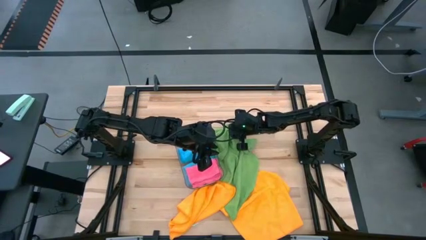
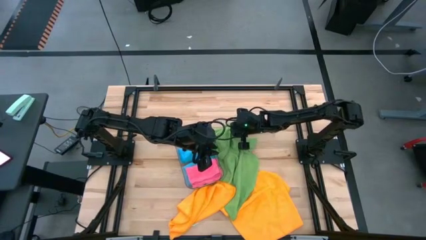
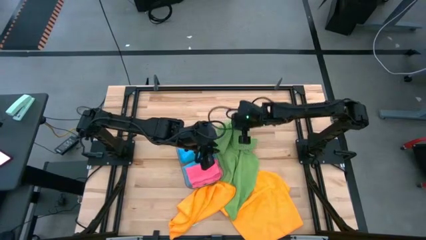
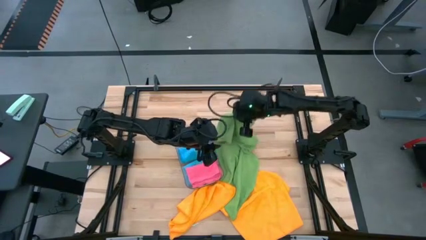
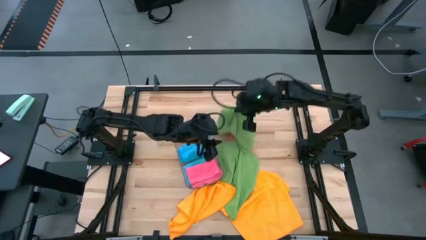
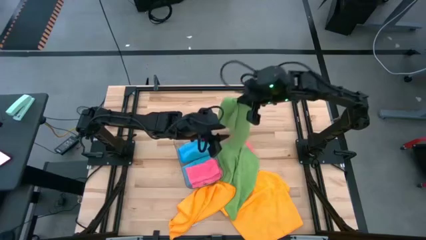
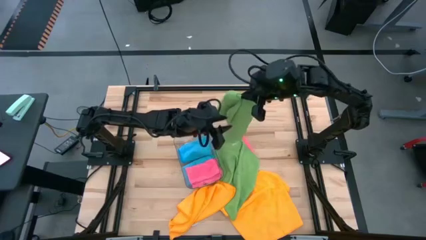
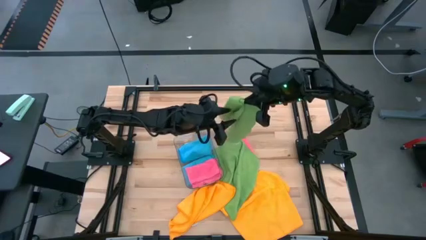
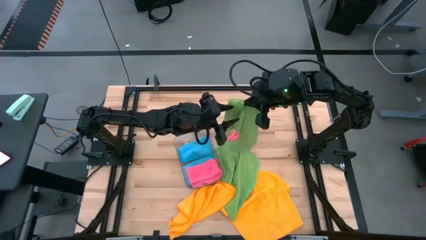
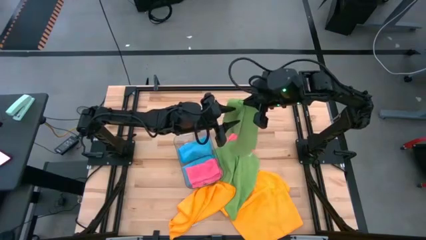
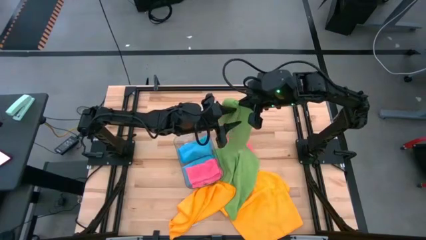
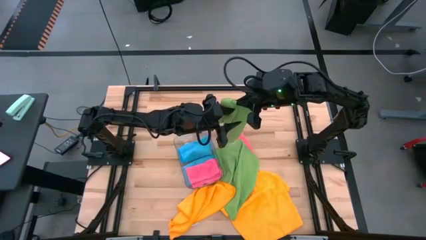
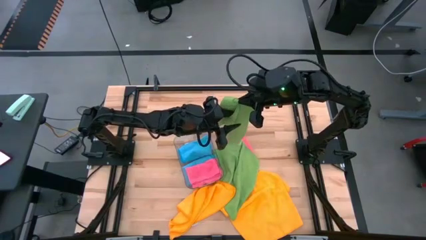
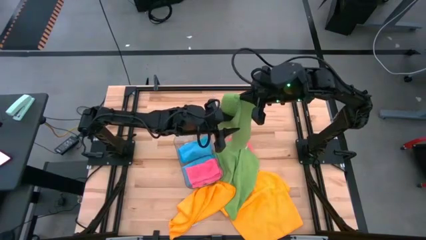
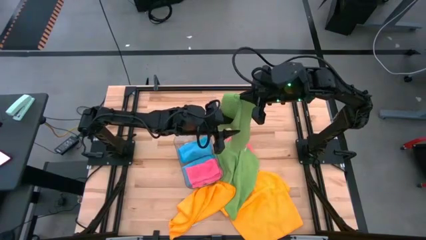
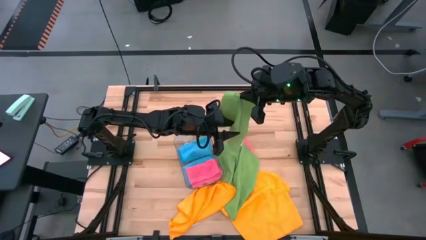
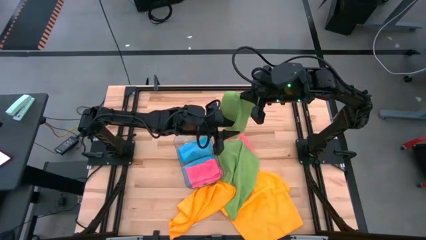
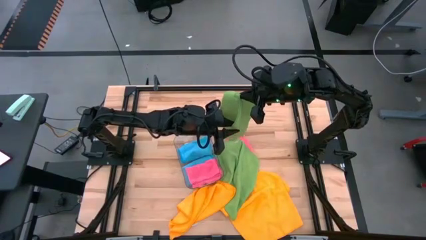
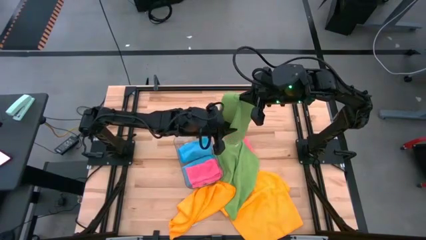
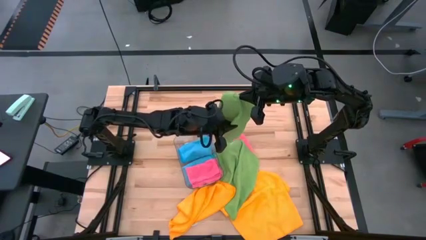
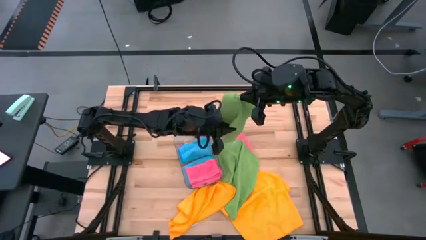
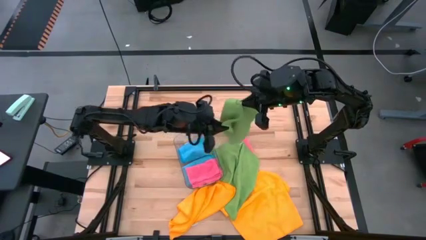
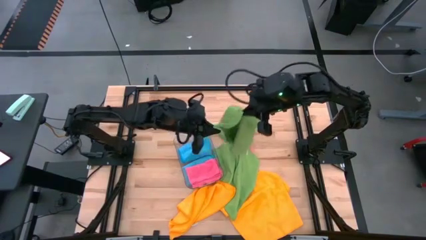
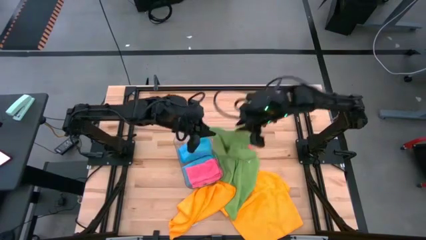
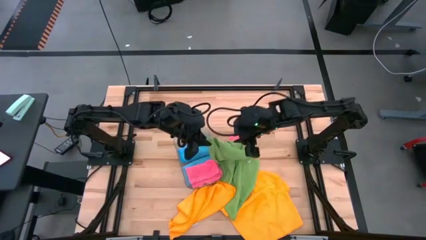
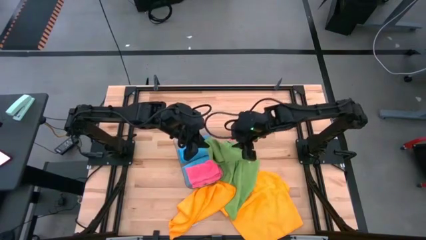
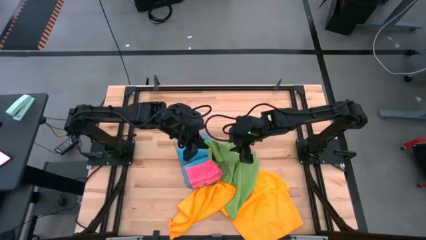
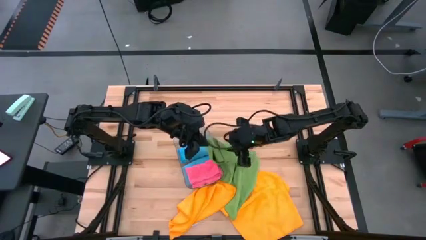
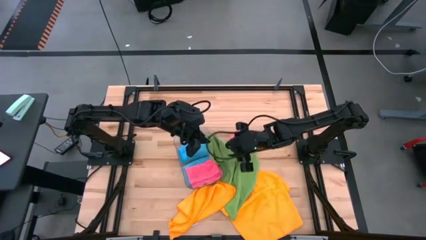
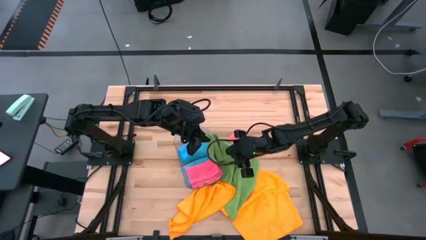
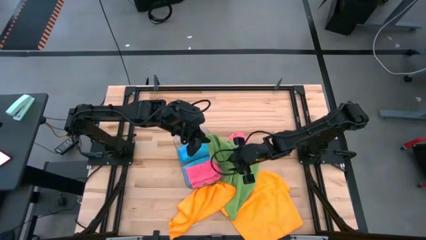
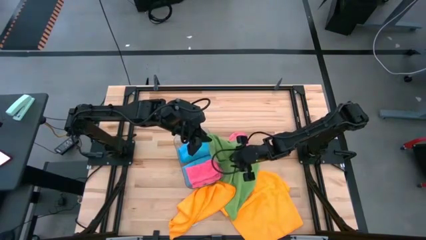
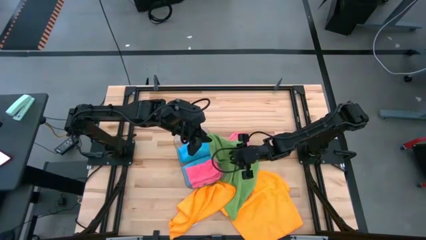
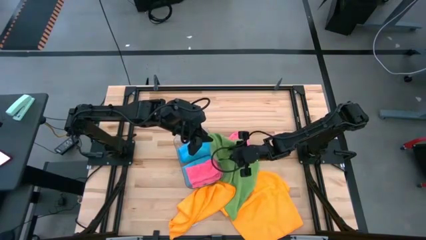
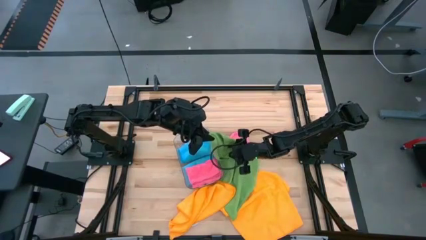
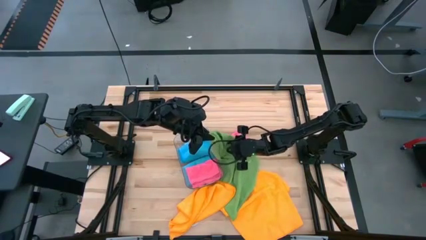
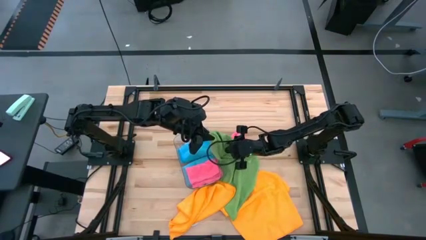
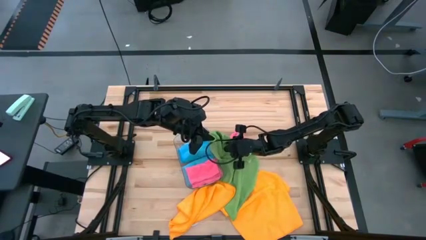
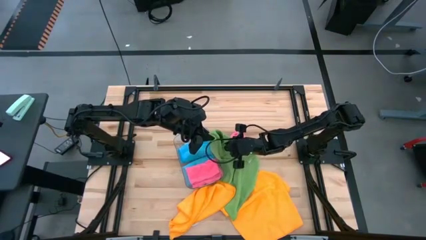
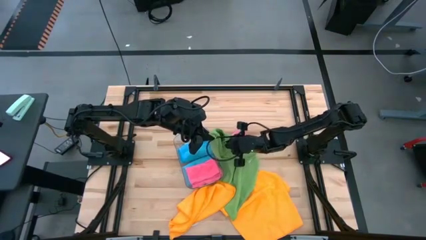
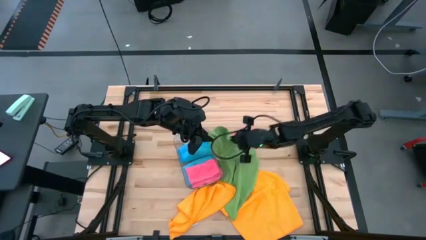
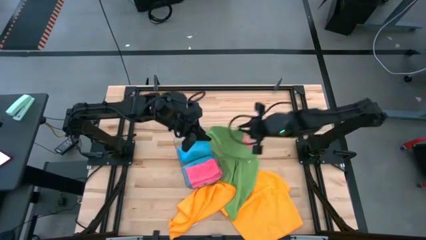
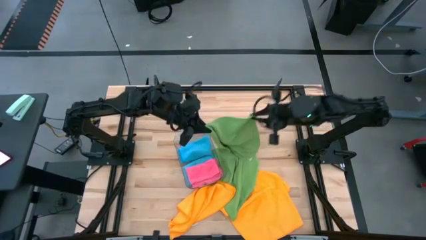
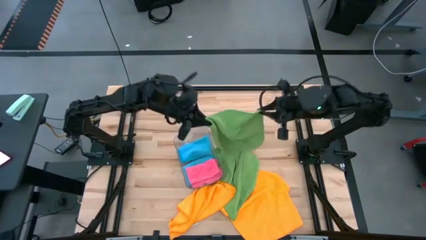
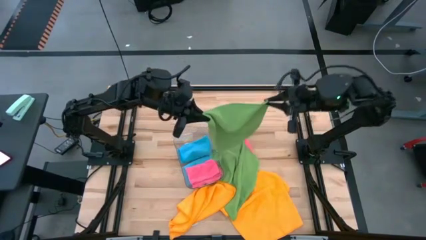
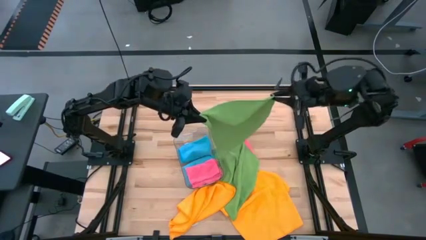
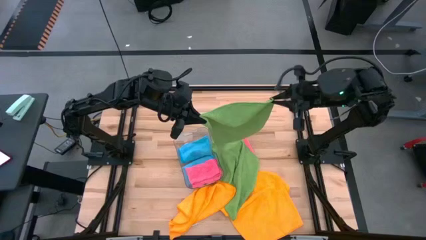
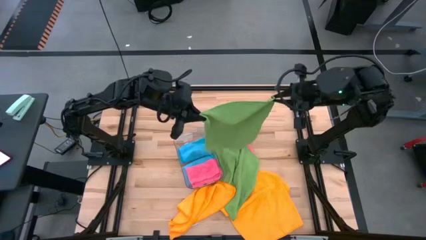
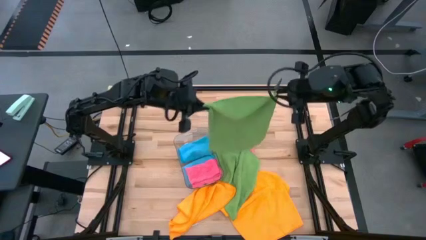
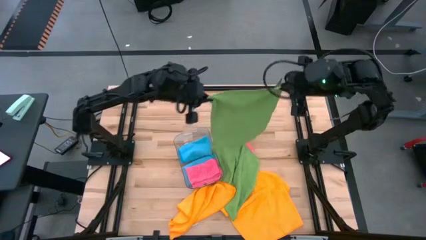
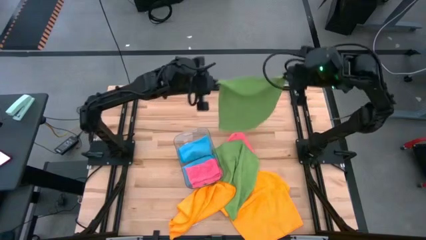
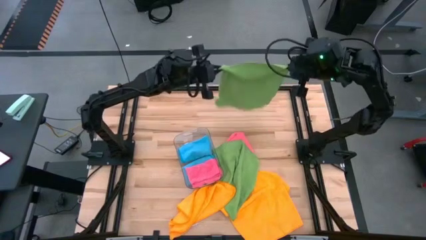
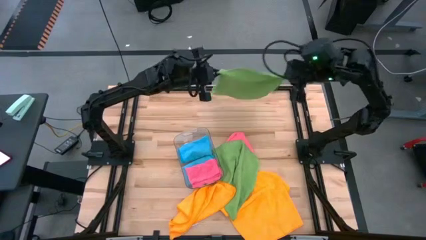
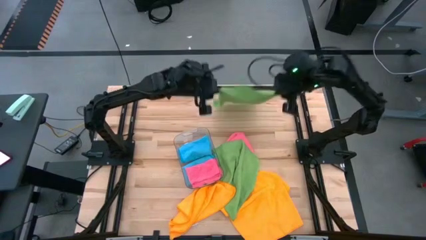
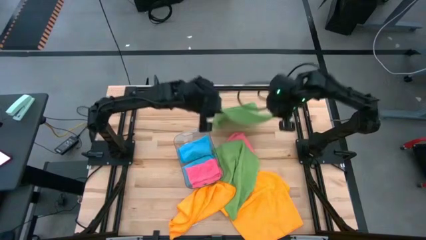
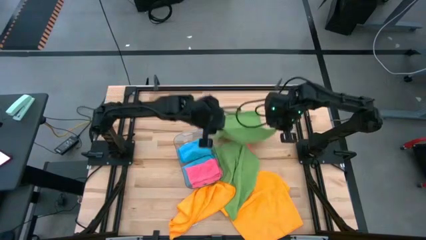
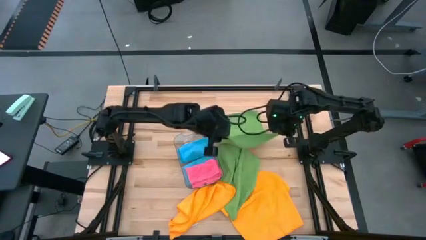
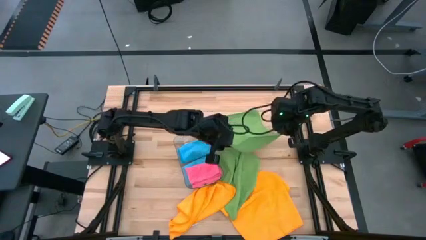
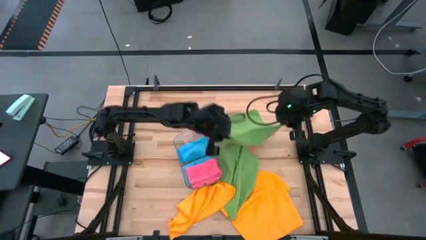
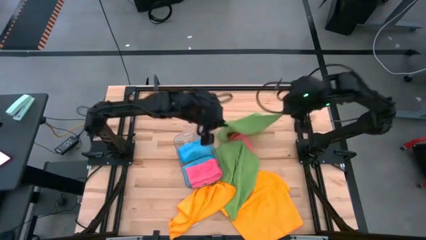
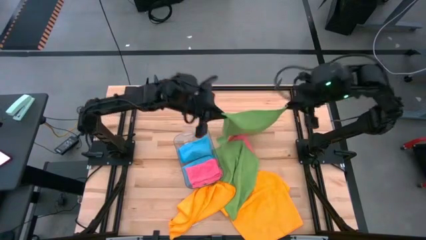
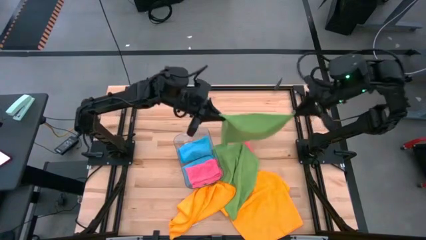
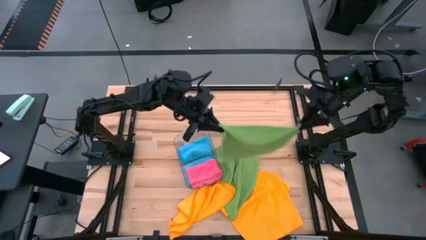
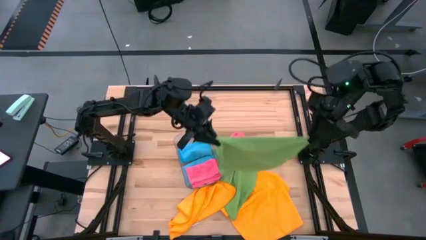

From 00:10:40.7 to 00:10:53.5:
Task: Fold microfiber towels
Fold the top green towel
